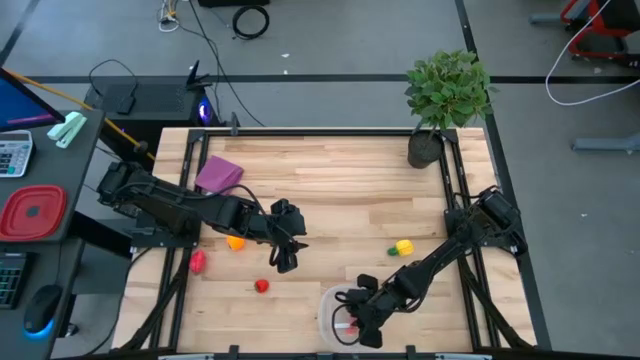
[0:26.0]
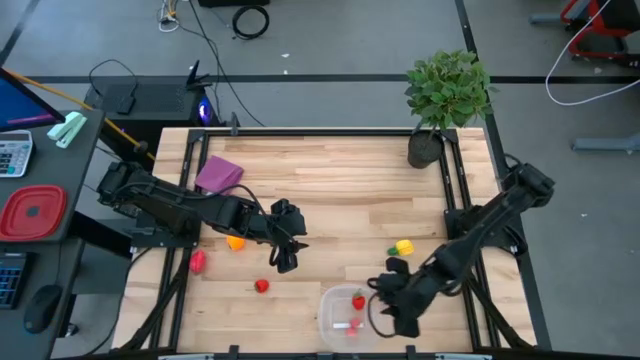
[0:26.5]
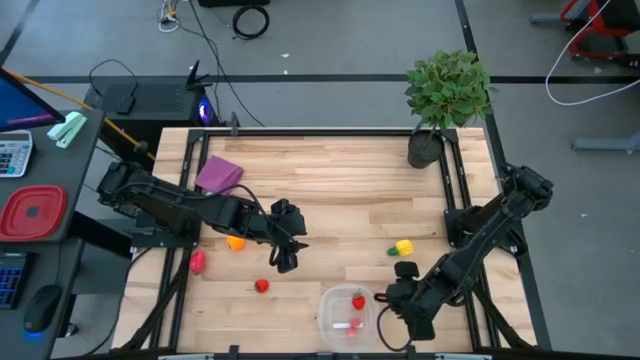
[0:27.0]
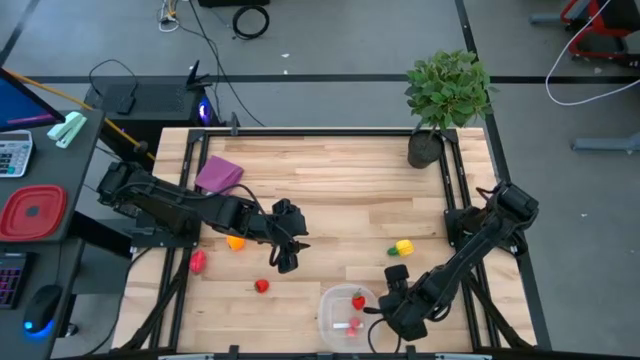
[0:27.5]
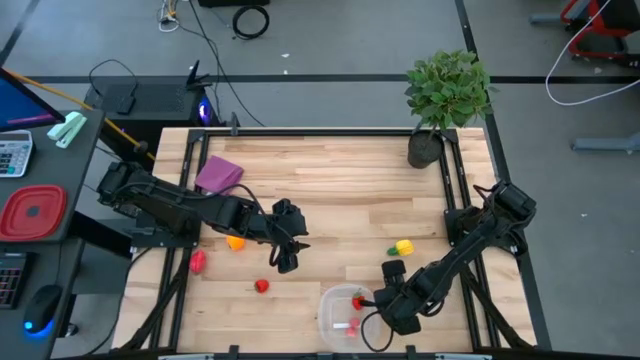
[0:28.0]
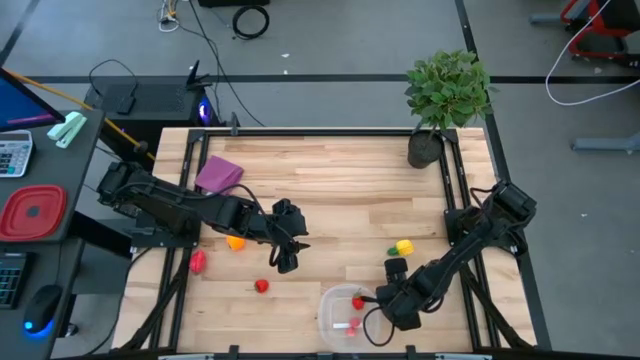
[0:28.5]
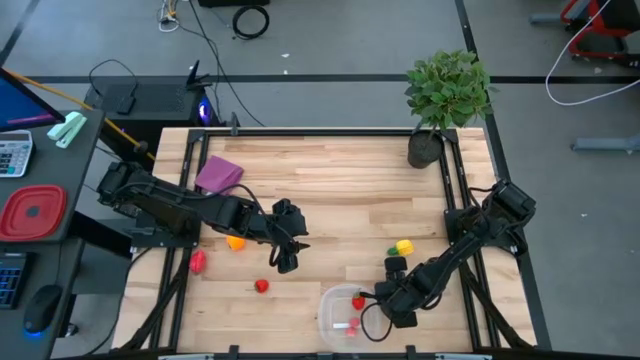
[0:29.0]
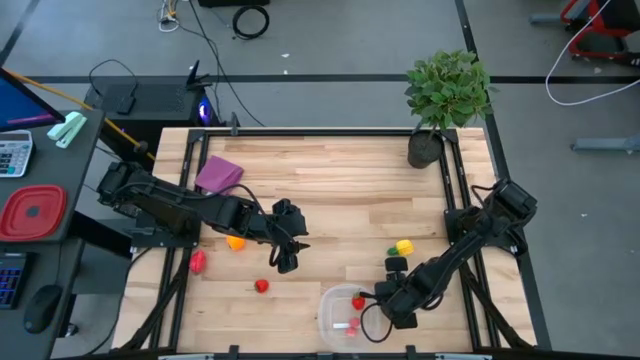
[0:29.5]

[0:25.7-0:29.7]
Task: Pick and placing Produce into tupperware
Put the potato into the transparent bin

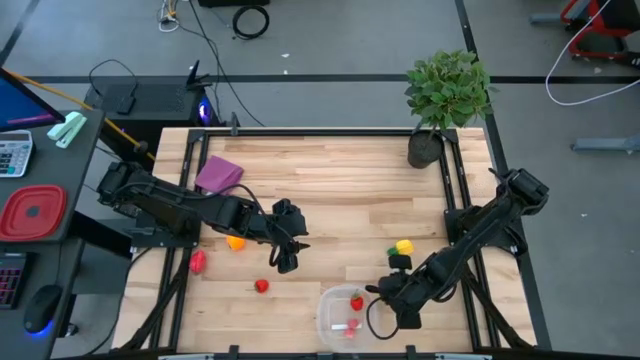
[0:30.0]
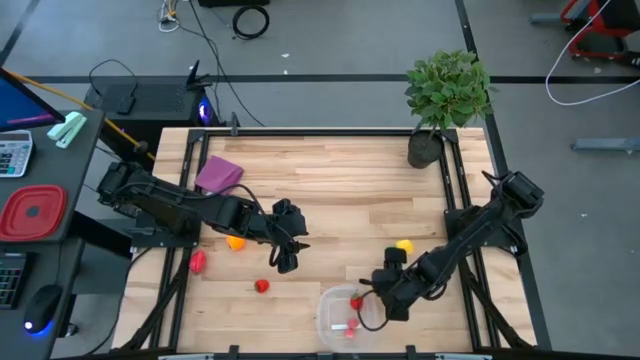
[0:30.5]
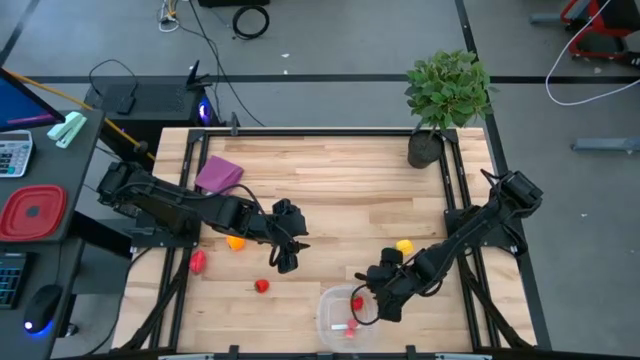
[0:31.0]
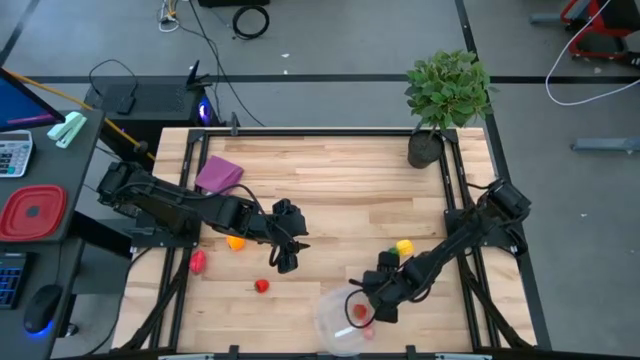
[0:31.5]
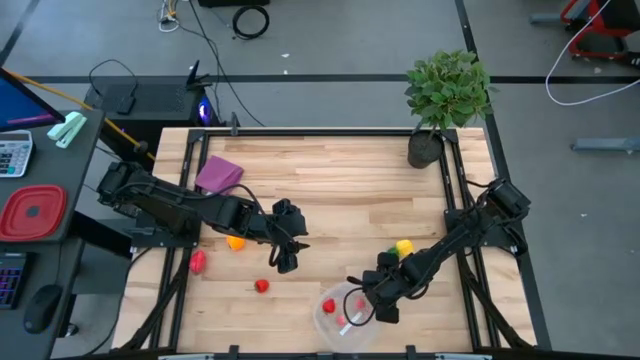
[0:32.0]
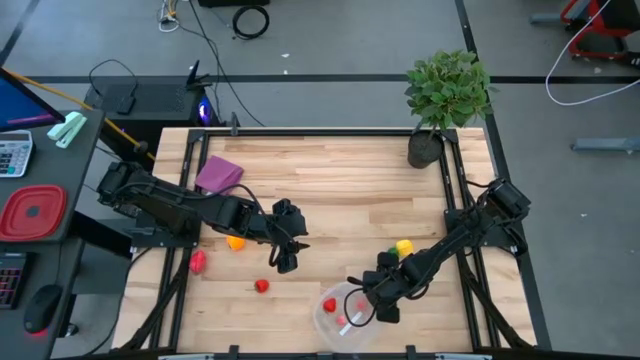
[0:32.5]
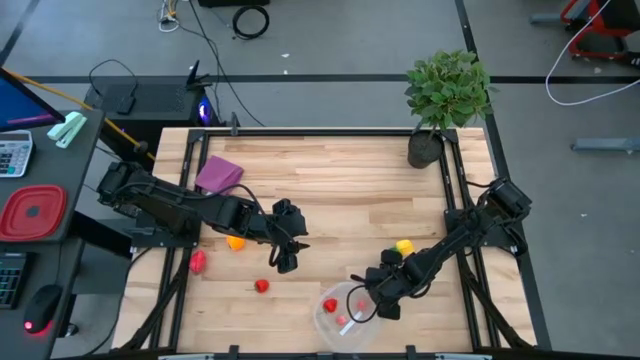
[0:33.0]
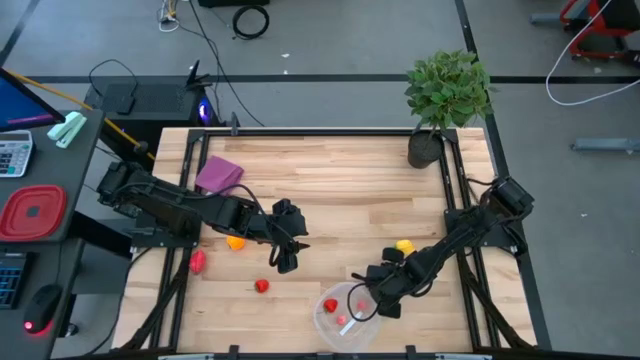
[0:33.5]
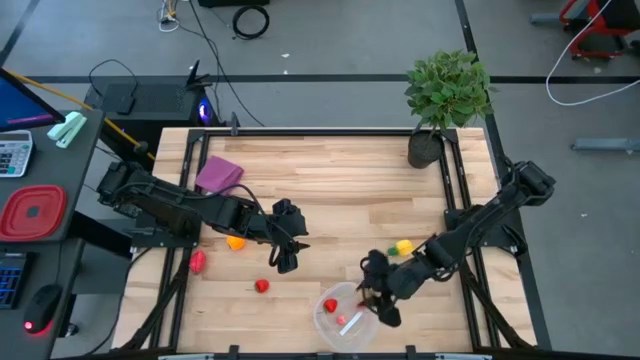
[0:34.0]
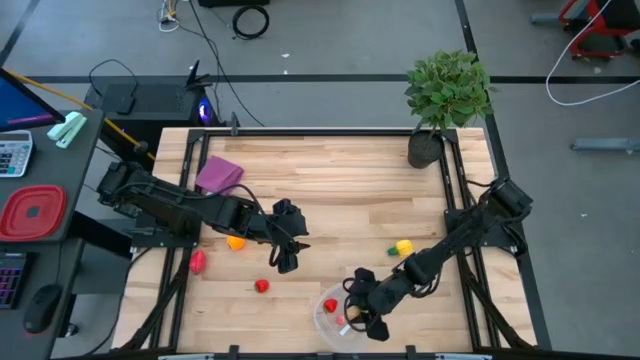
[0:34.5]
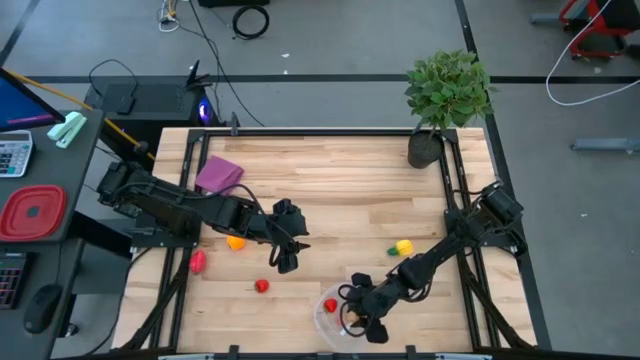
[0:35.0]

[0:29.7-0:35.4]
Put the potato into the transparent bin

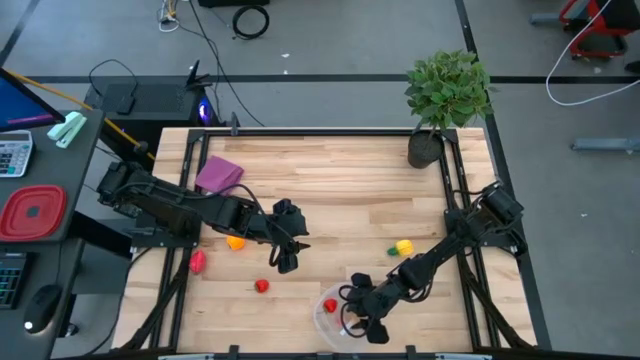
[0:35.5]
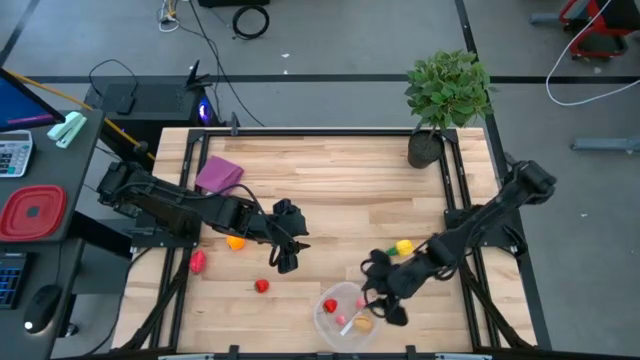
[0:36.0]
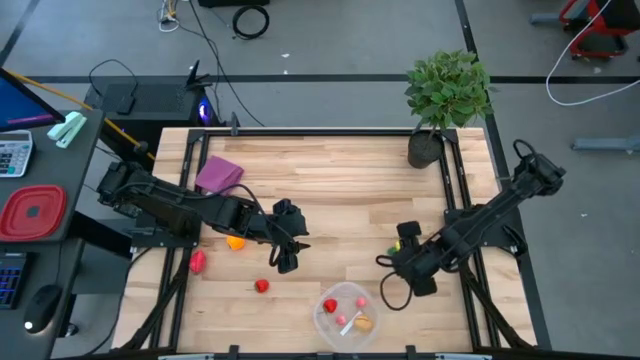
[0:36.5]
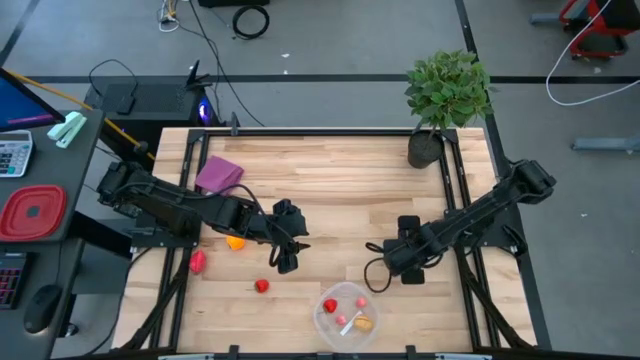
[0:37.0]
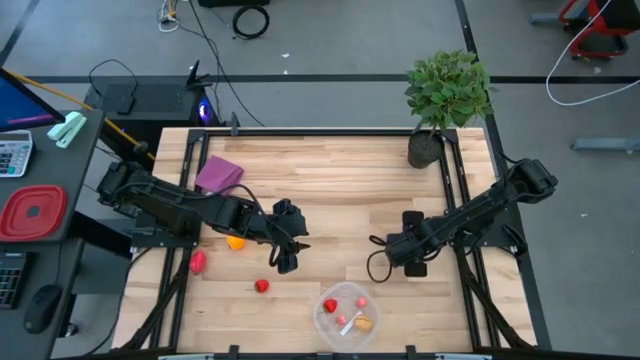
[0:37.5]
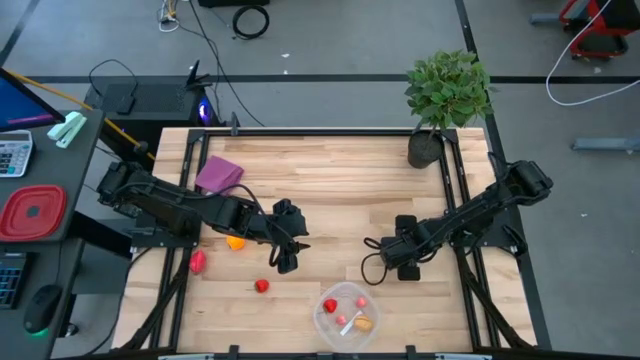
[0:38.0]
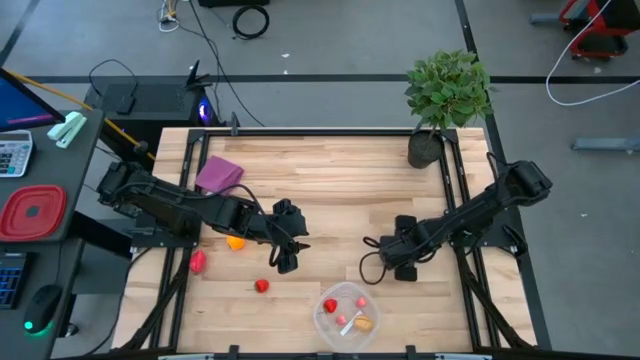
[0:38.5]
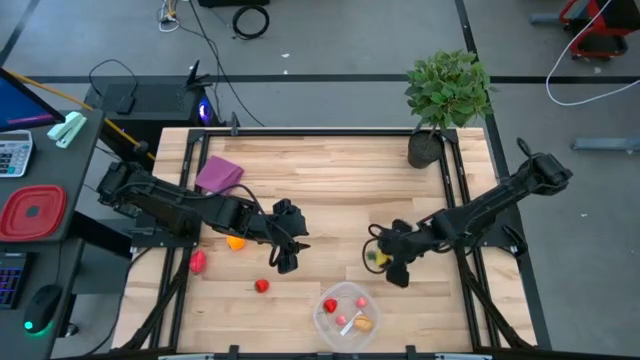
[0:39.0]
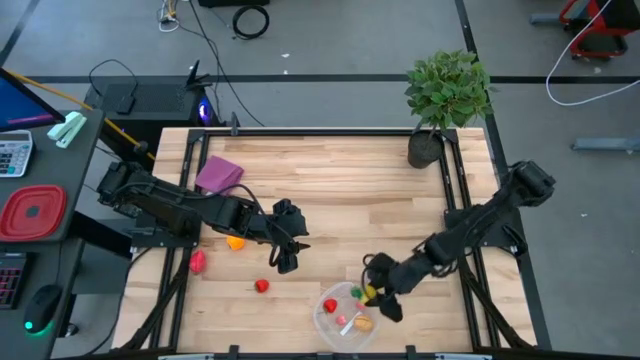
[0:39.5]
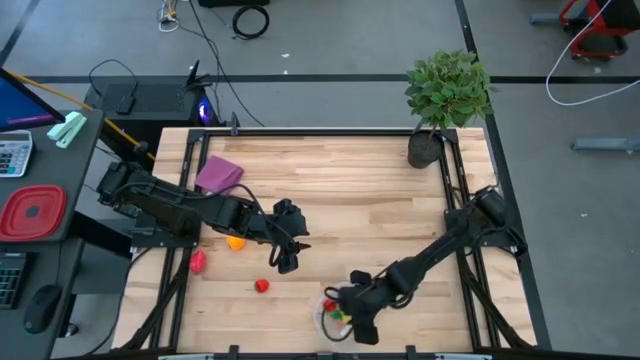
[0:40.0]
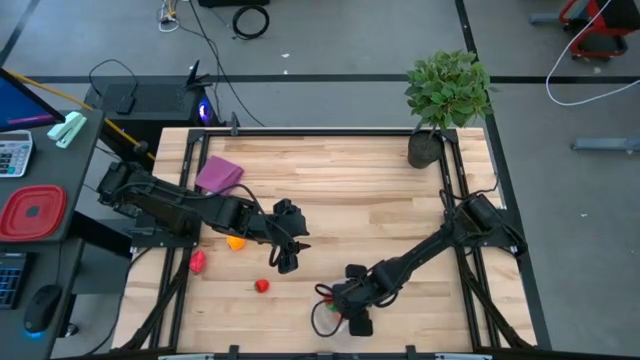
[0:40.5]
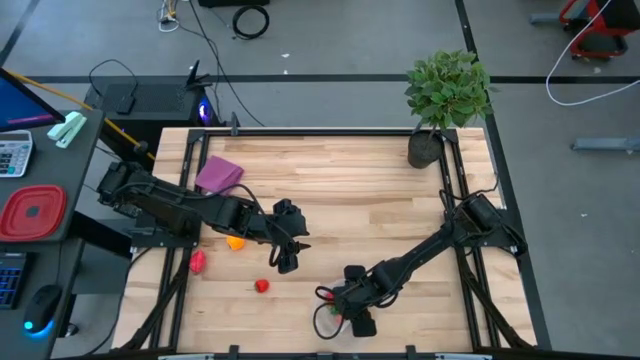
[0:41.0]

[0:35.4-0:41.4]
Put the pineapple into the transparent bin

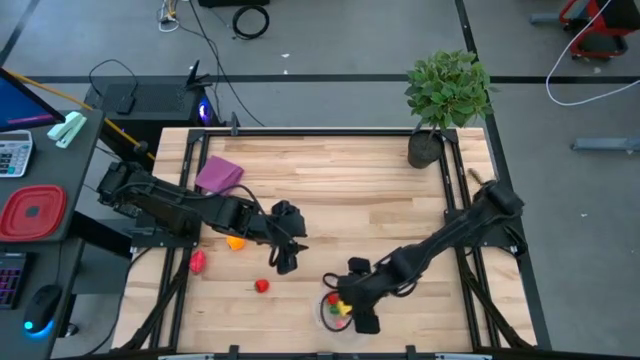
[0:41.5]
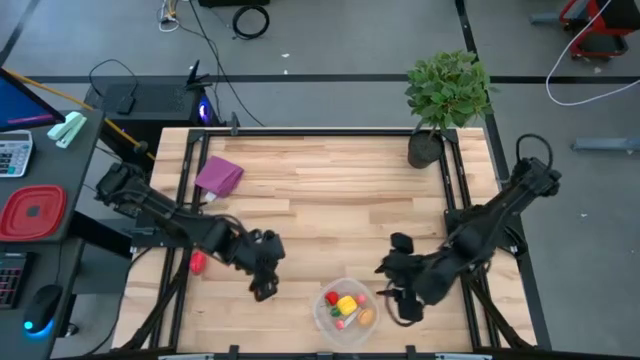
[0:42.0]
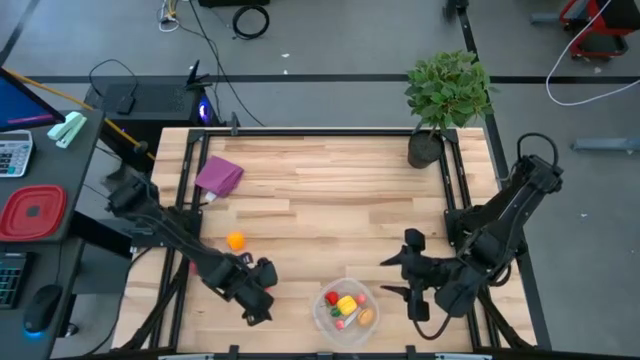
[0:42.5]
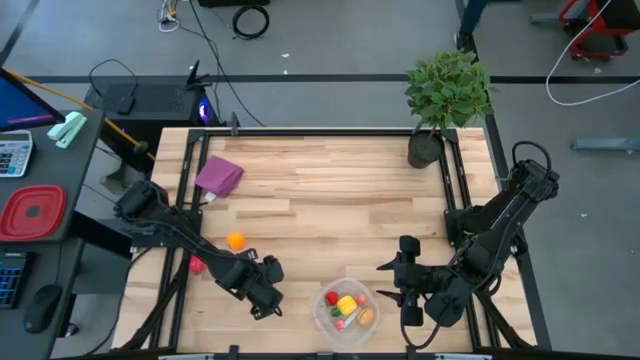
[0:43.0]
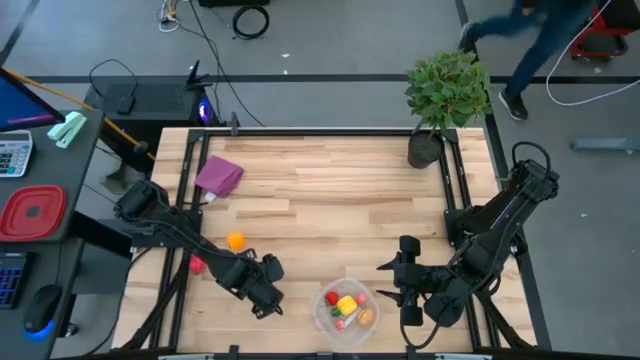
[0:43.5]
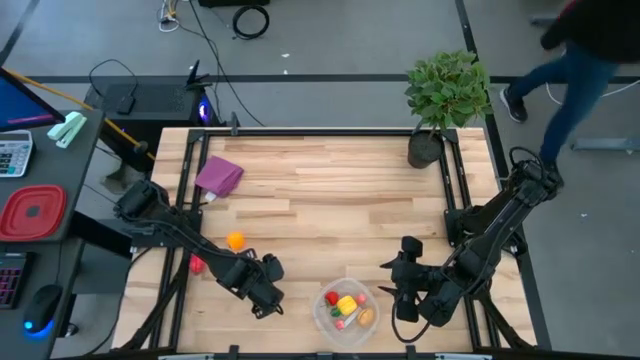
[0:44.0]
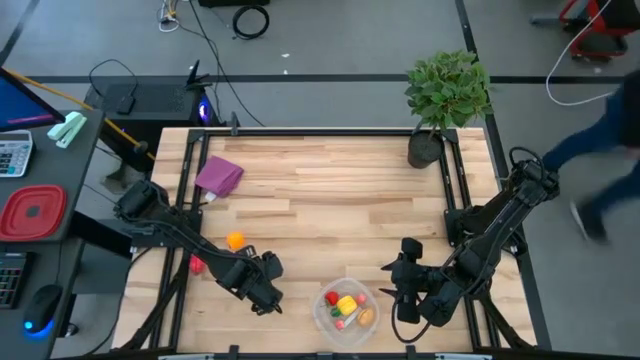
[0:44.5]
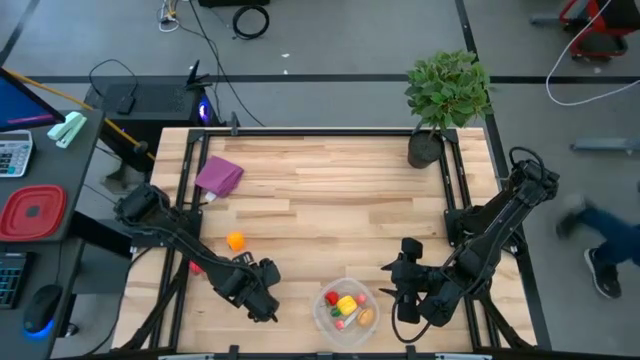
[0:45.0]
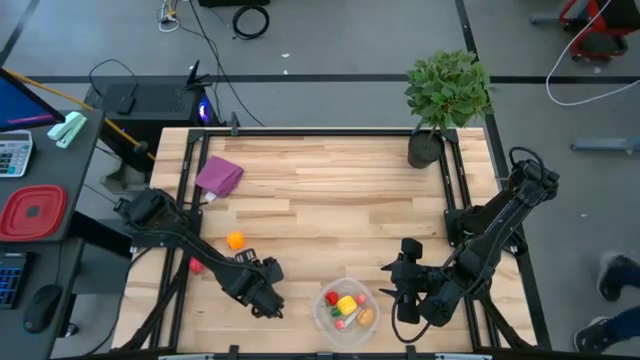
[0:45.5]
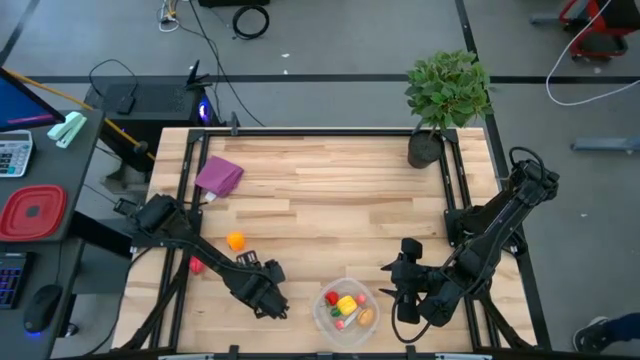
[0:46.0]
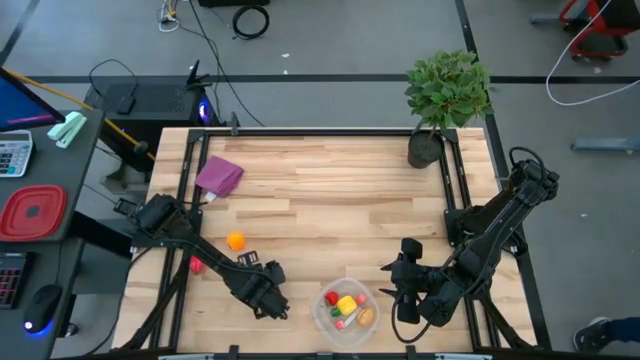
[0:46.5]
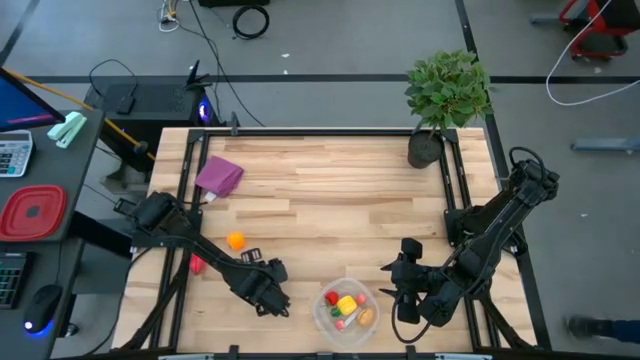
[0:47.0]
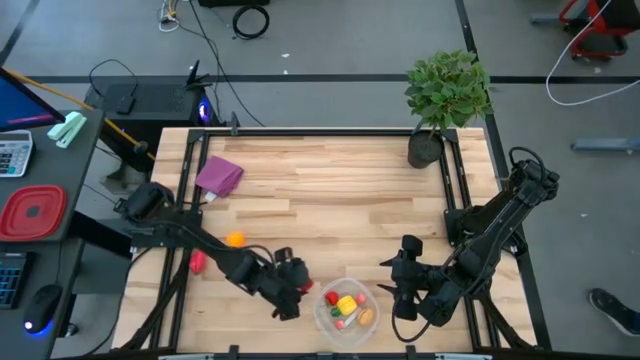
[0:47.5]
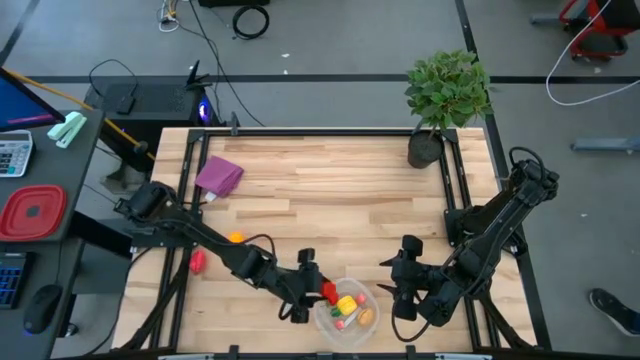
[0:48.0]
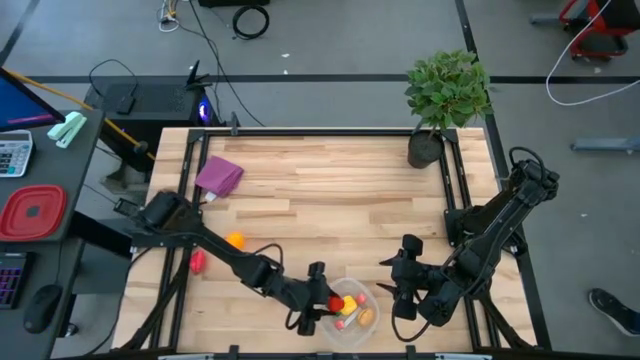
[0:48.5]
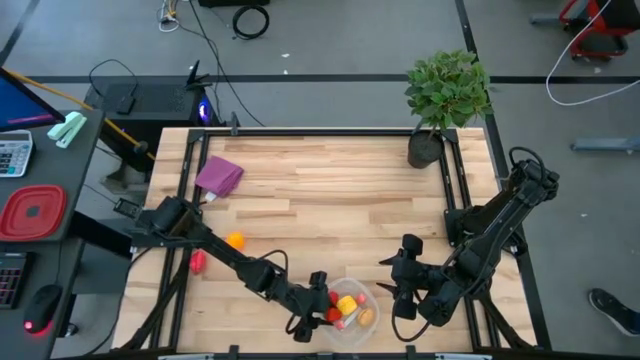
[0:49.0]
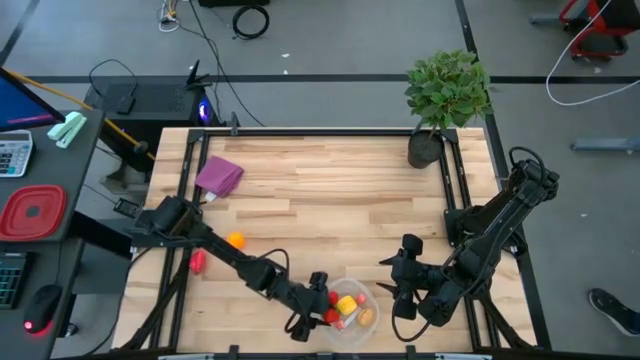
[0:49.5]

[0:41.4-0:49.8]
Put the strawberry into the transparent bin
